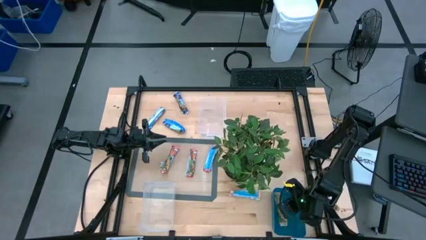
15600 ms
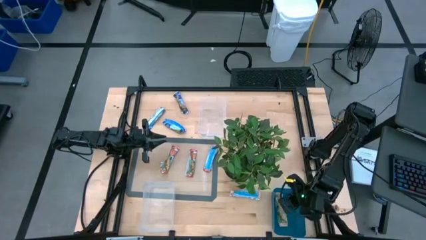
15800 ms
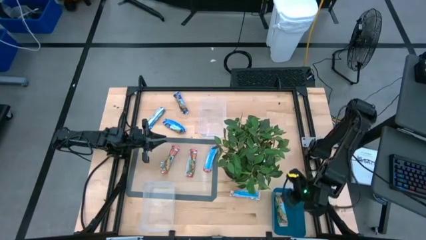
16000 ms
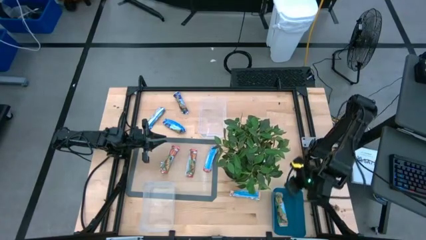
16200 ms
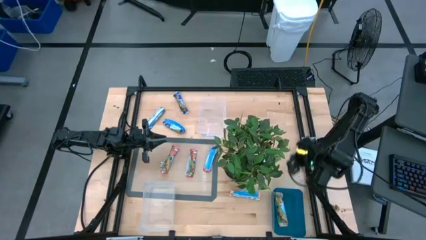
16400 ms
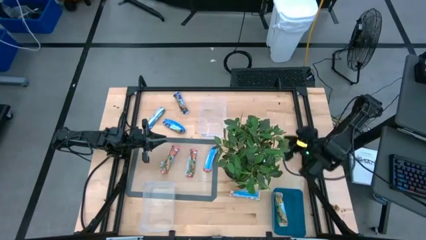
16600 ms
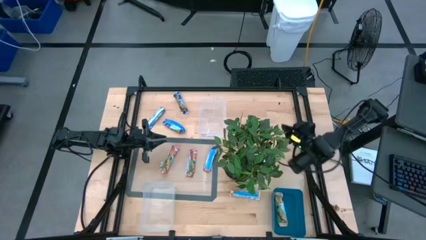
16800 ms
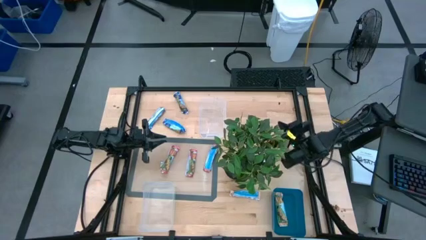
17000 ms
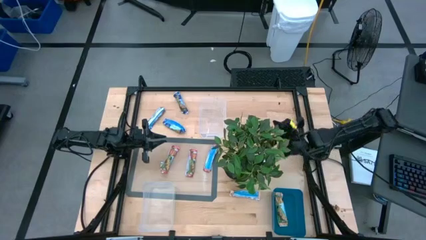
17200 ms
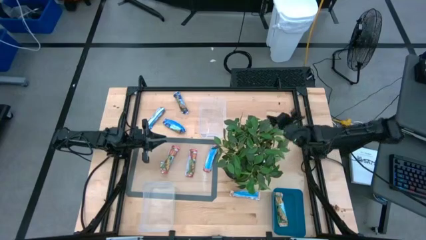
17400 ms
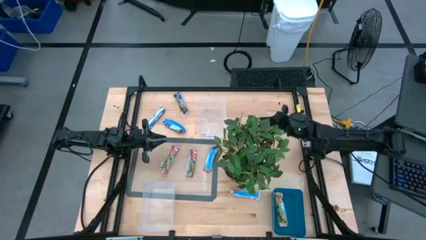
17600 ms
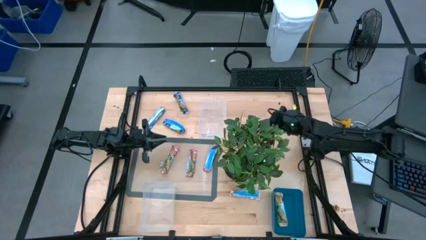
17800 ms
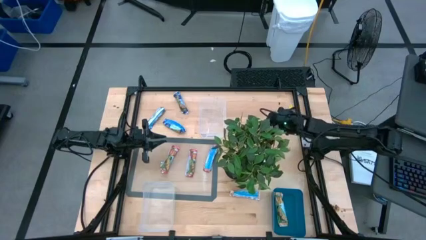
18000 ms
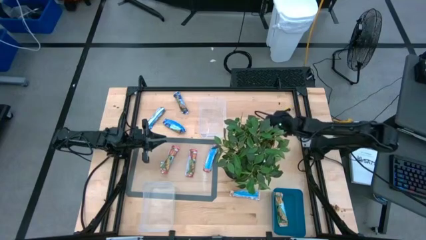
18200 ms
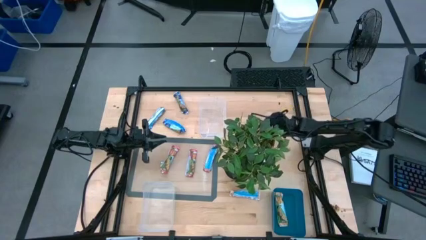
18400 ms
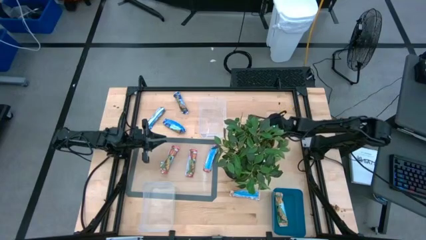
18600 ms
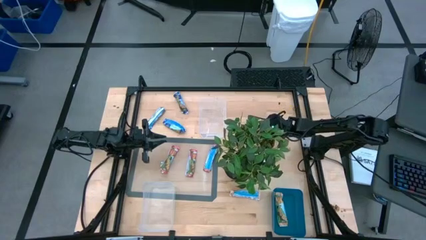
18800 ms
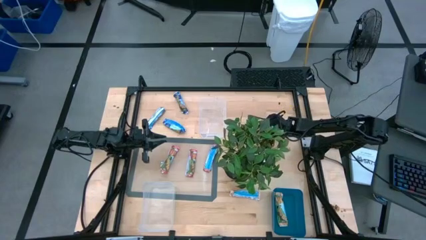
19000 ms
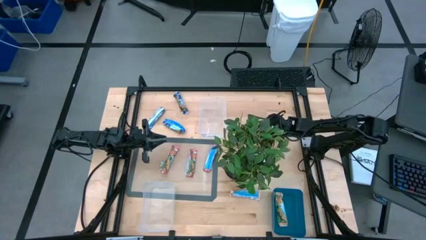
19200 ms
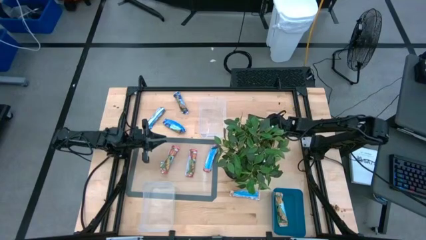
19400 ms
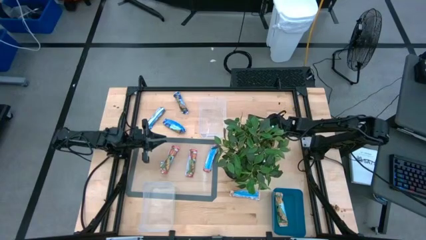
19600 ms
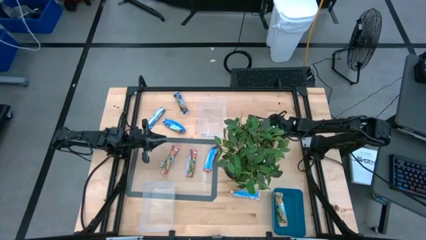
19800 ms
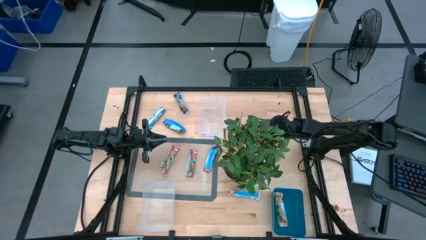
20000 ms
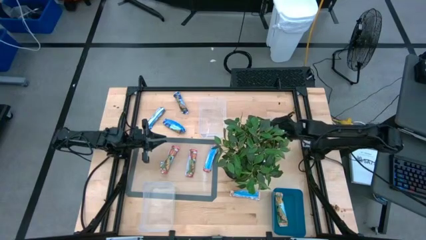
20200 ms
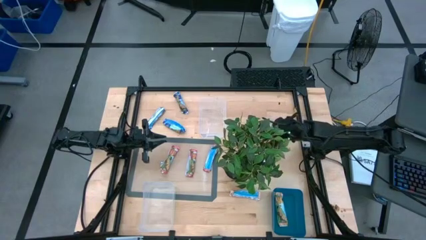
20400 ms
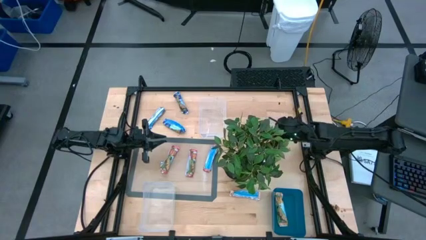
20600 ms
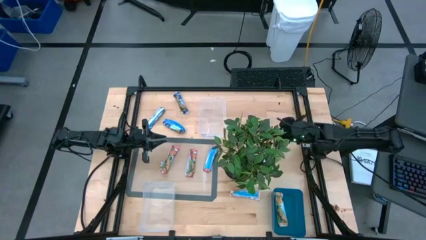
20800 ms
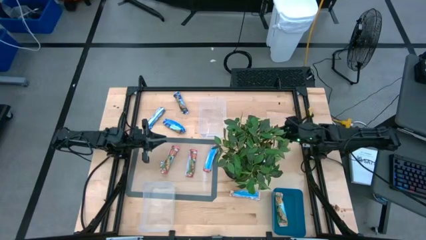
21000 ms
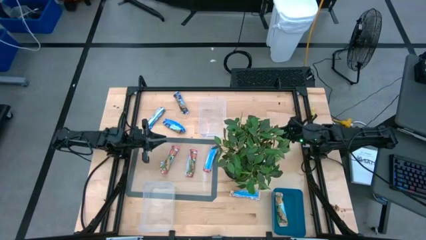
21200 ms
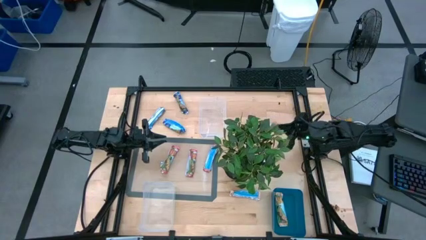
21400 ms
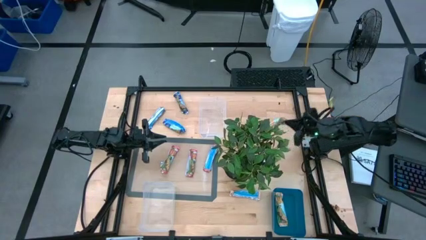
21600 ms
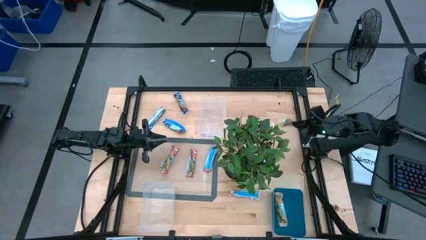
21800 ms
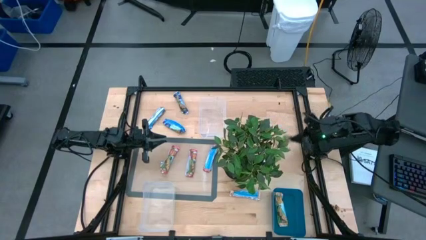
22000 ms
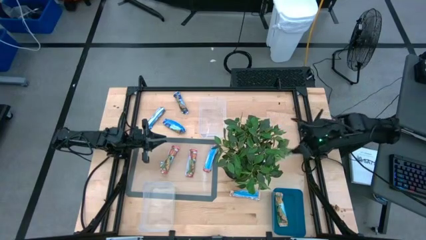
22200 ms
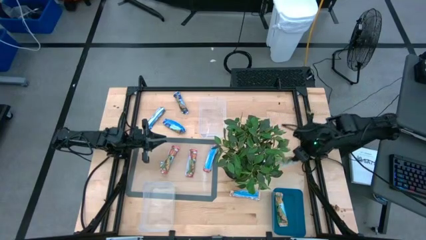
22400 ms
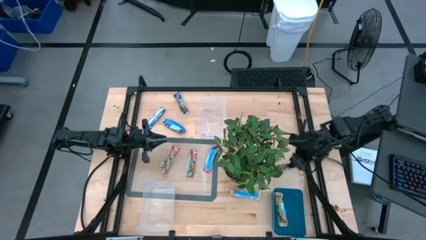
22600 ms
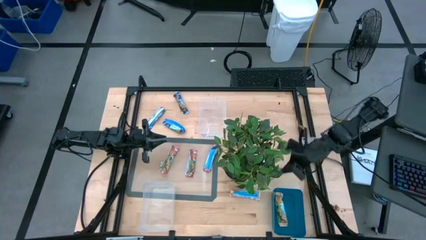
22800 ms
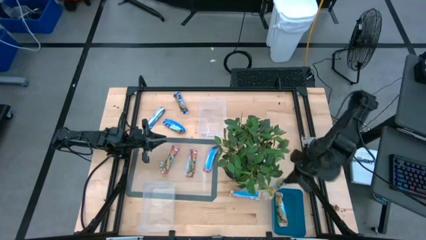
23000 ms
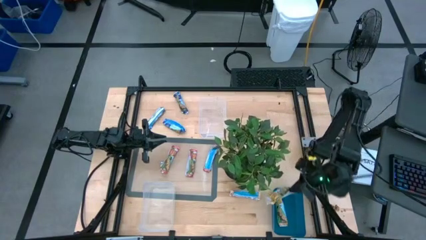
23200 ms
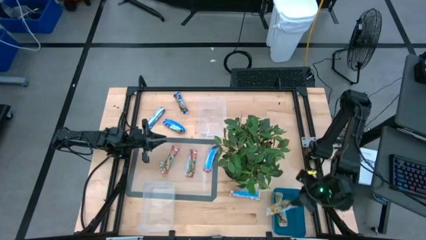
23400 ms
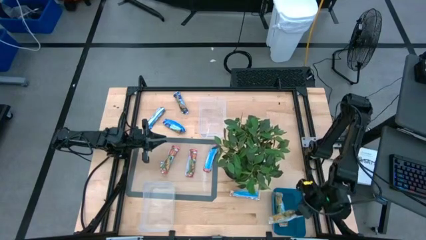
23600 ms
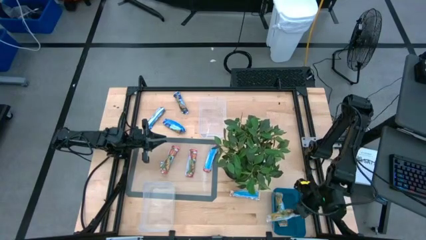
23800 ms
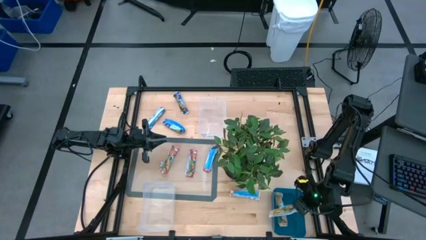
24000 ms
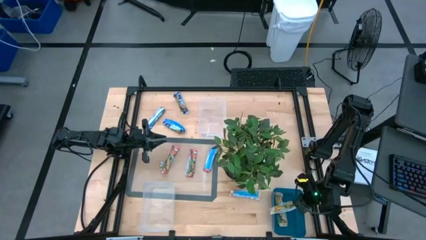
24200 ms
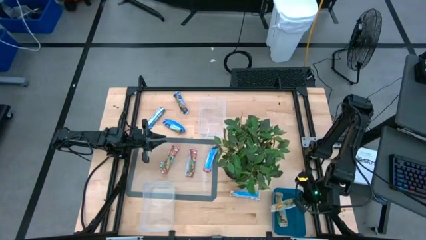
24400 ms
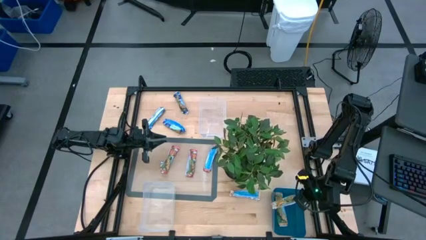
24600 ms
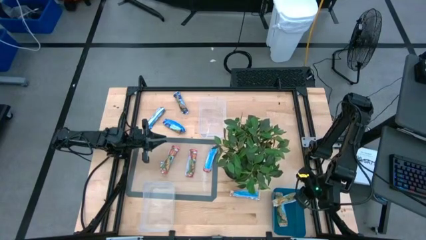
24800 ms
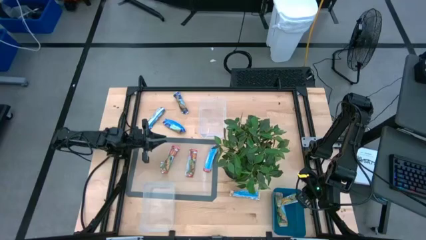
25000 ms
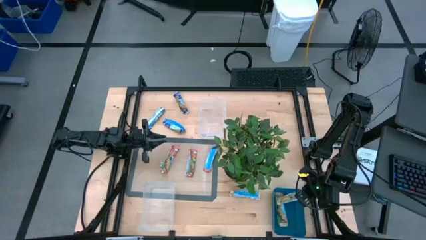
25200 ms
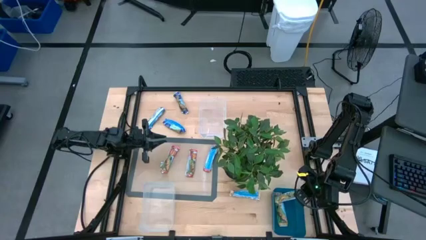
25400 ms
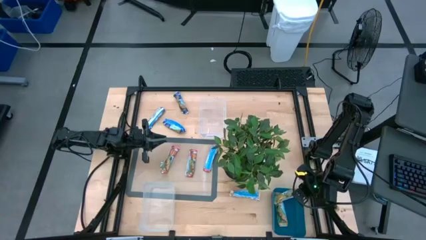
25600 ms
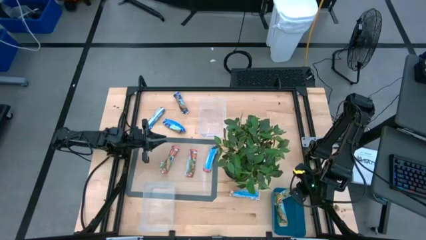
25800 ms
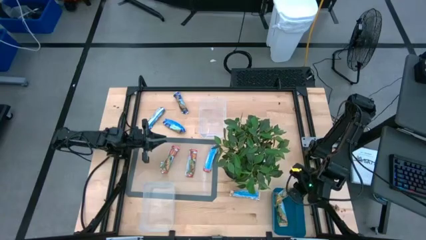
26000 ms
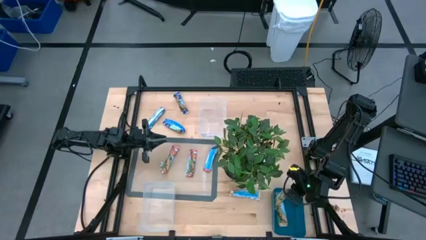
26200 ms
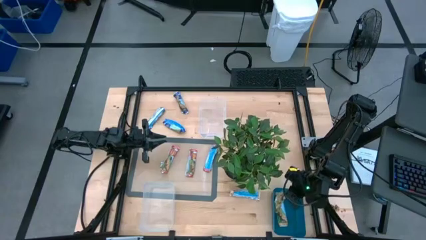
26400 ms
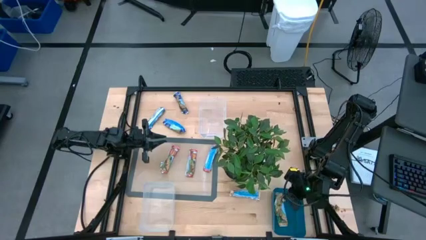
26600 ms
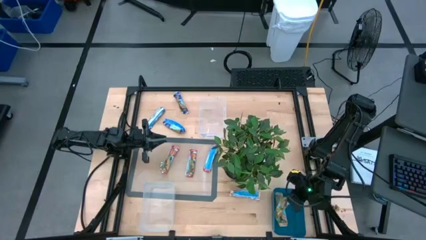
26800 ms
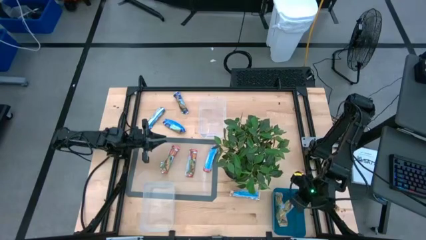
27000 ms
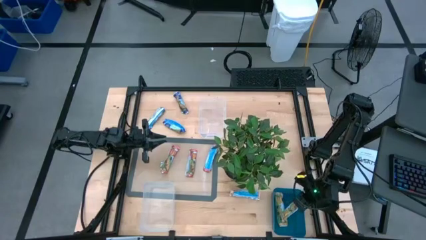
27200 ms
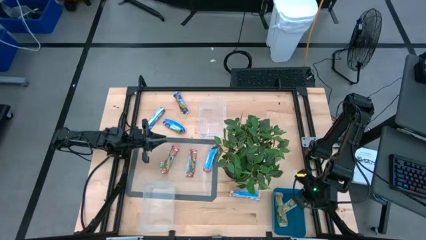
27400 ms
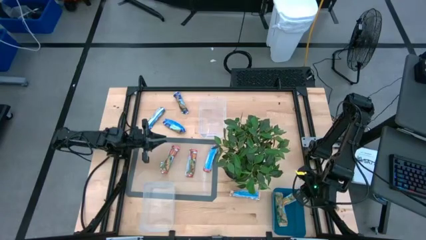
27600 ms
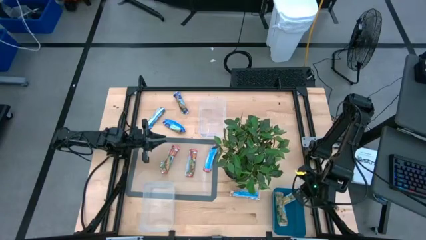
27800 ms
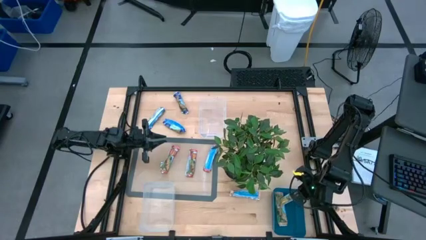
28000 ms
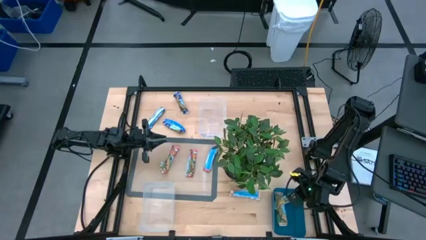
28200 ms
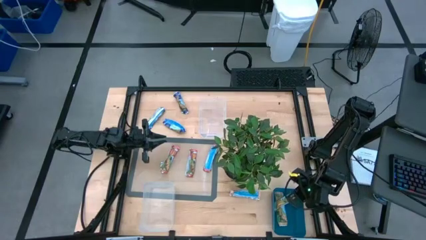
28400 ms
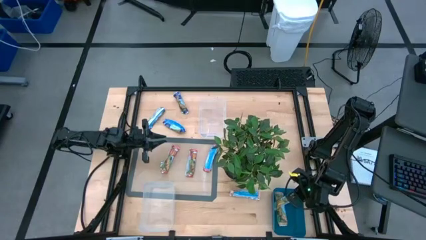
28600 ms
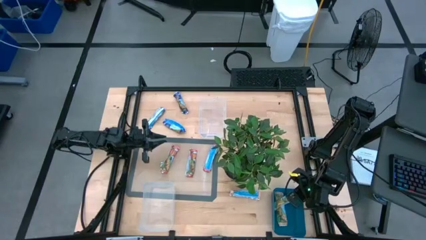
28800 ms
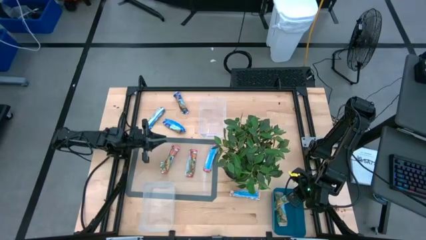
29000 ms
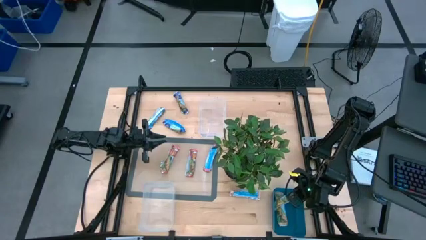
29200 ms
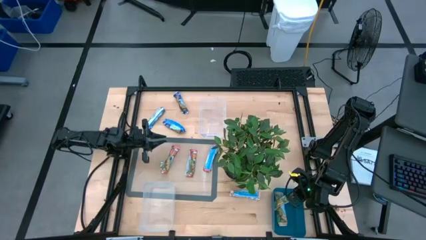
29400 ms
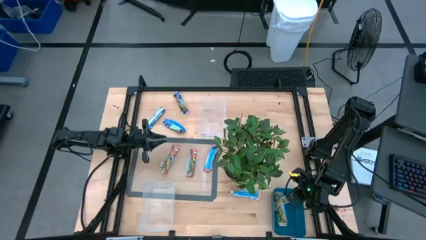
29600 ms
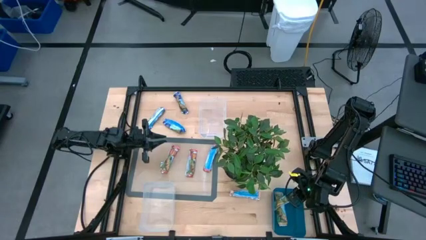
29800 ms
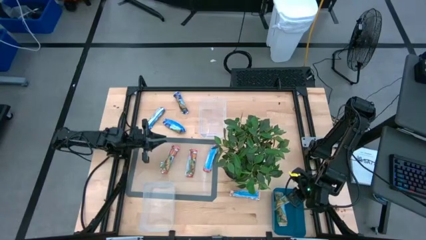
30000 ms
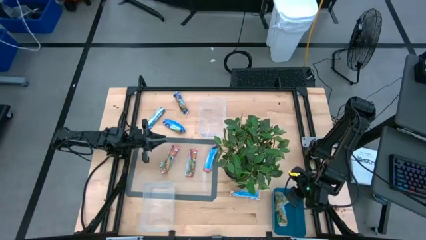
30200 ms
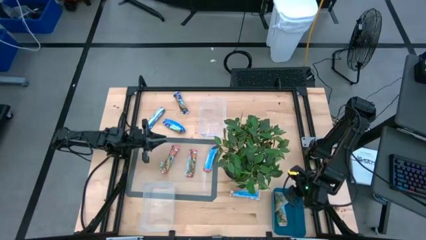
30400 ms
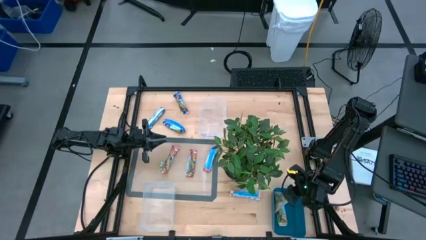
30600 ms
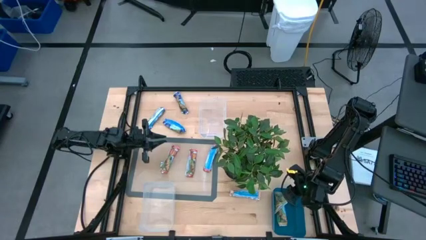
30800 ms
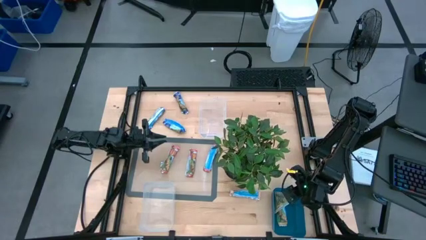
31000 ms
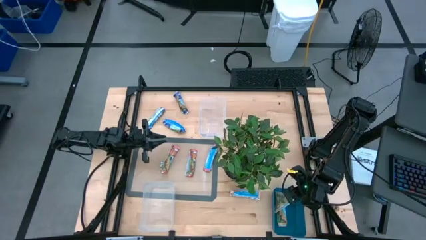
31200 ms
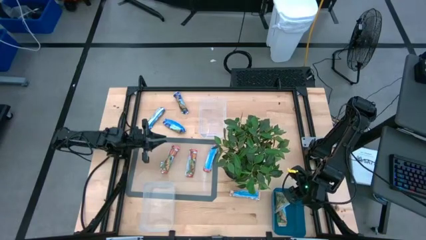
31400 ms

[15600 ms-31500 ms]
Task: Pick and place Granola Bars by type
Put the green granola bar into the blue bin
